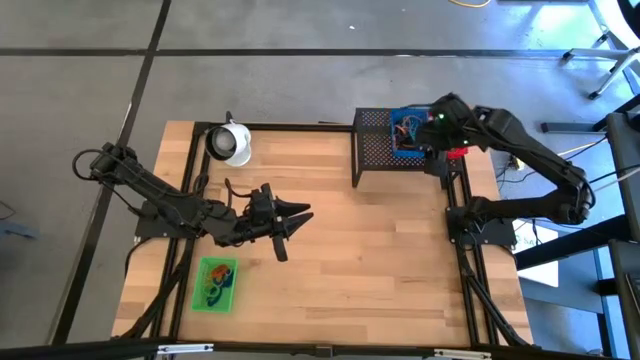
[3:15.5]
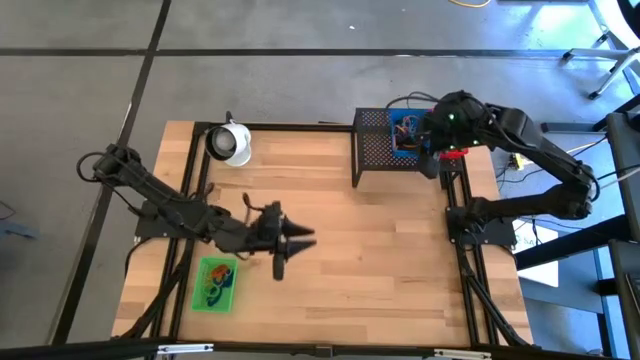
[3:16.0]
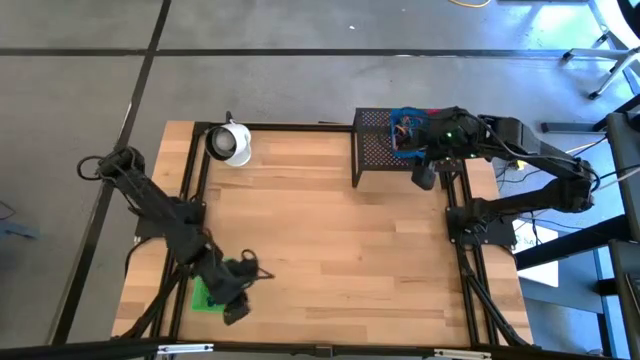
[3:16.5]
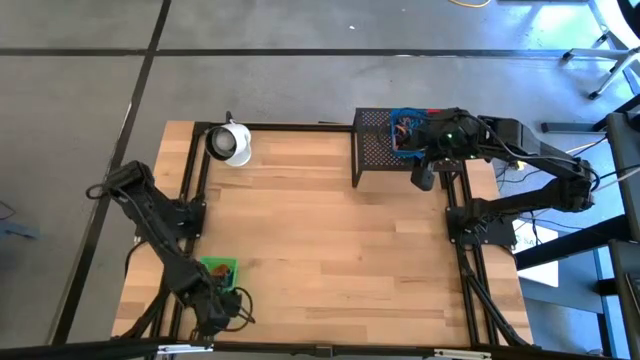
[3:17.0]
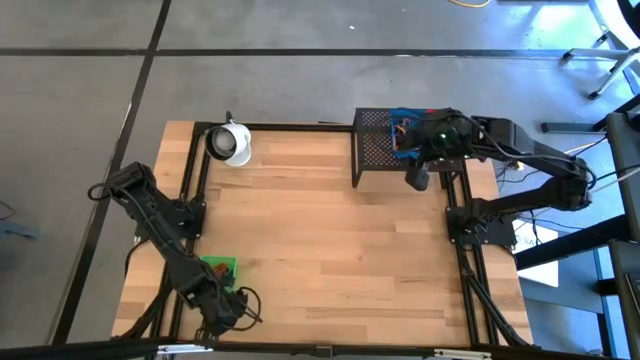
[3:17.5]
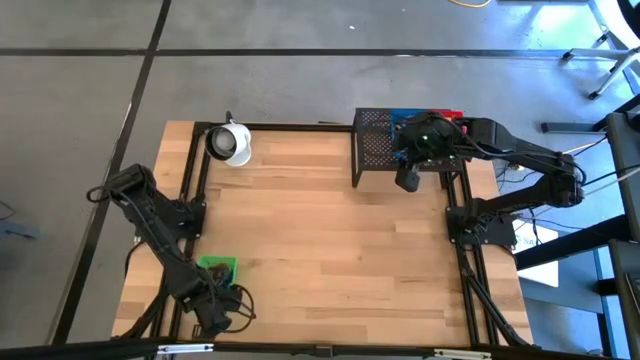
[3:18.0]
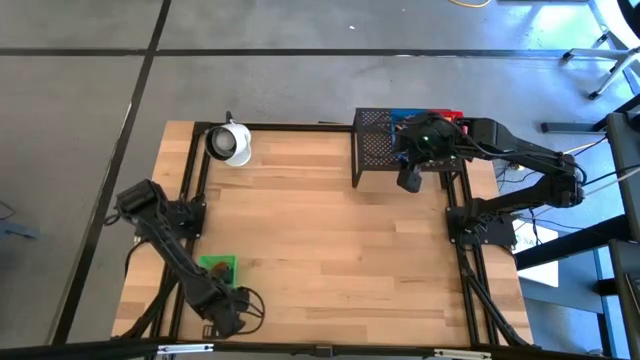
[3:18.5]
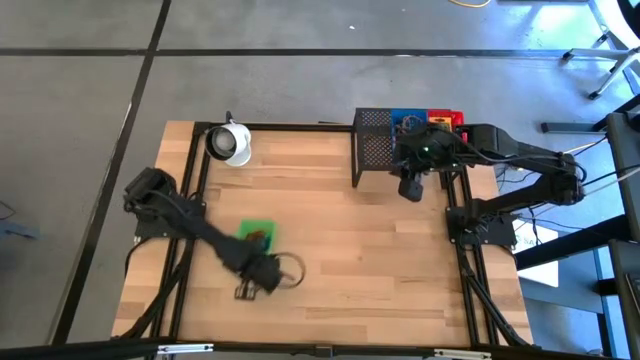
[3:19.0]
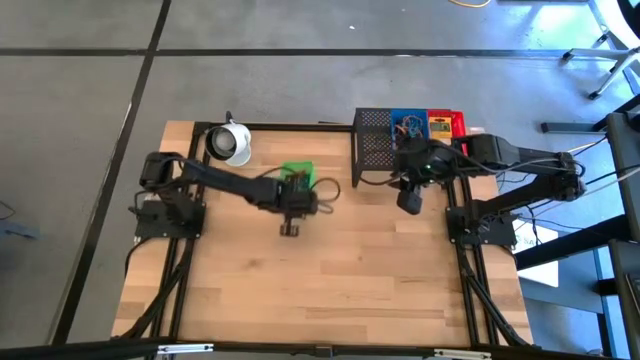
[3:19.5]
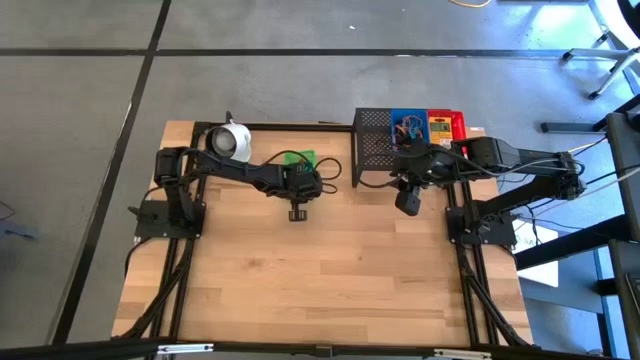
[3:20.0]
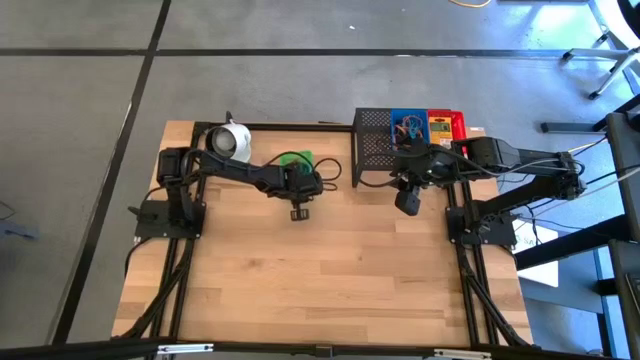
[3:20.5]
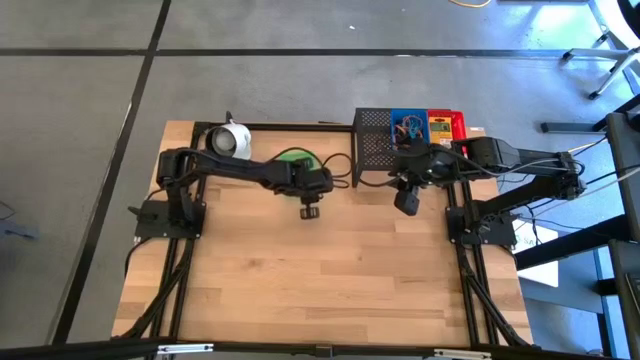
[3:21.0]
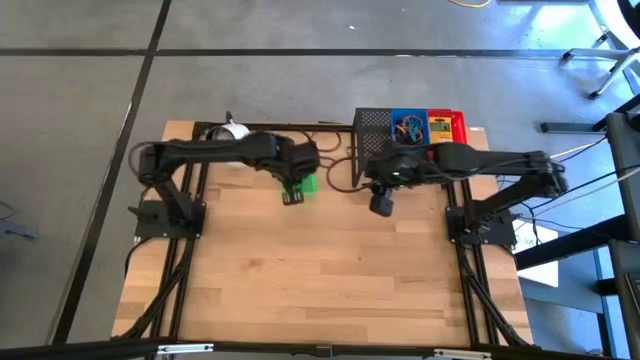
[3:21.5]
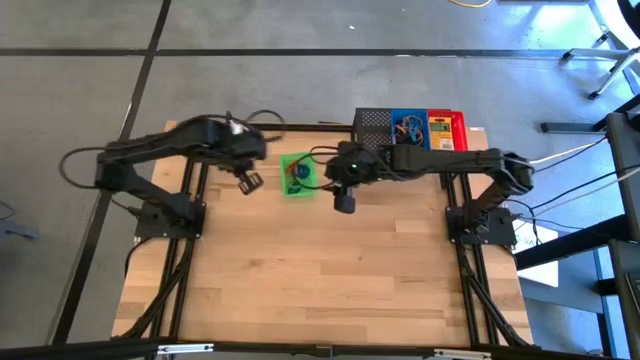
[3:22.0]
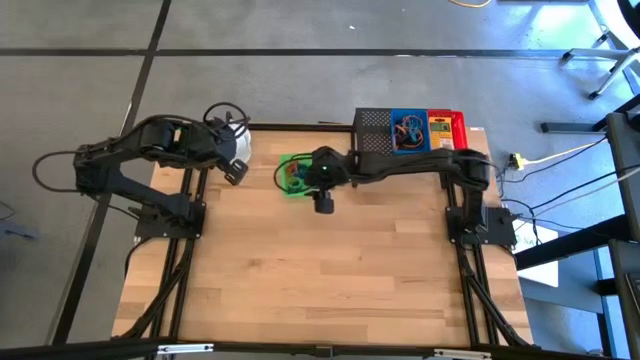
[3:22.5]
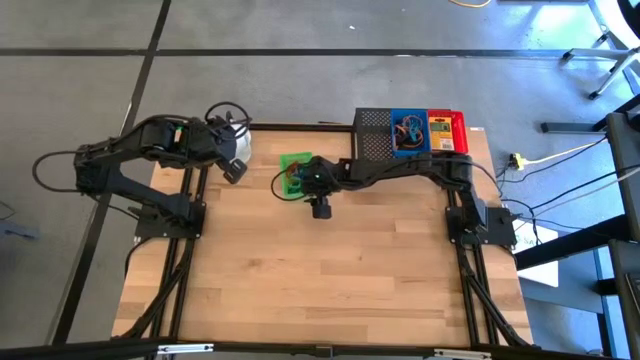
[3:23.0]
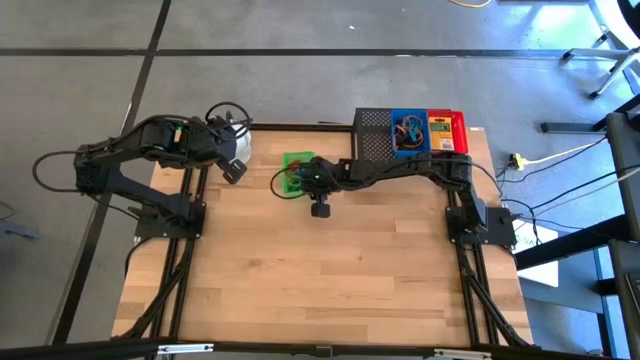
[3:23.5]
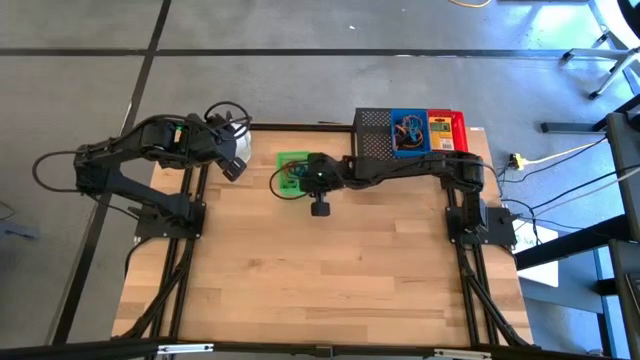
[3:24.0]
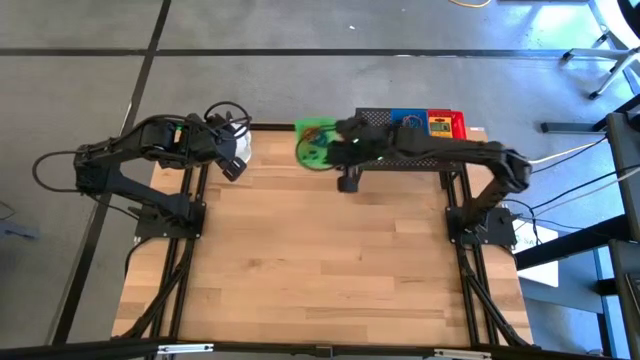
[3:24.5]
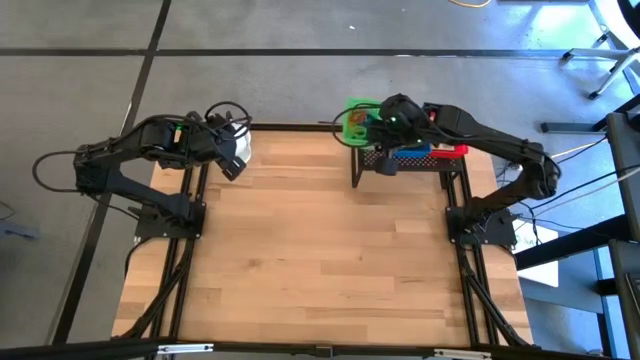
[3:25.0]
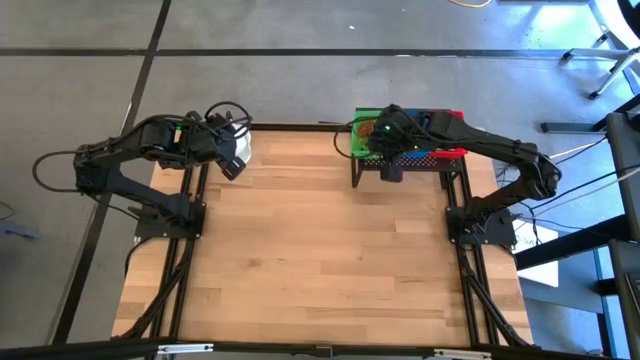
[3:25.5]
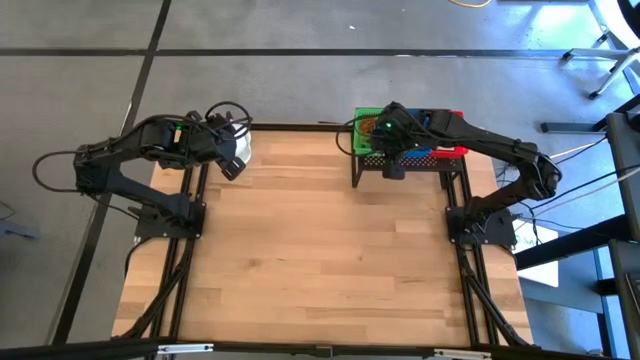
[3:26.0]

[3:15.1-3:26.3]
Task: Pick & Place Office Desk Supplies
Put the green bin with spring keychains on the shelf

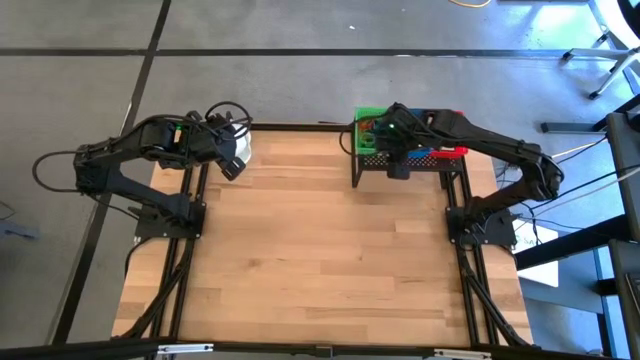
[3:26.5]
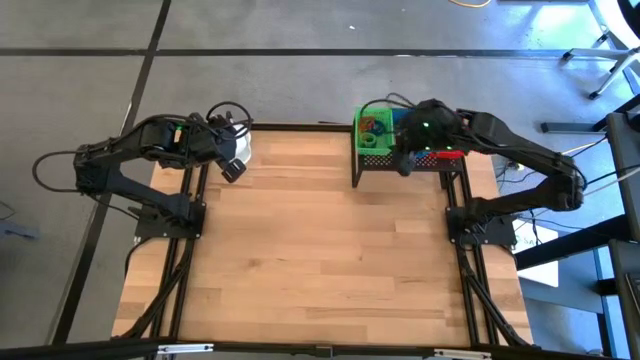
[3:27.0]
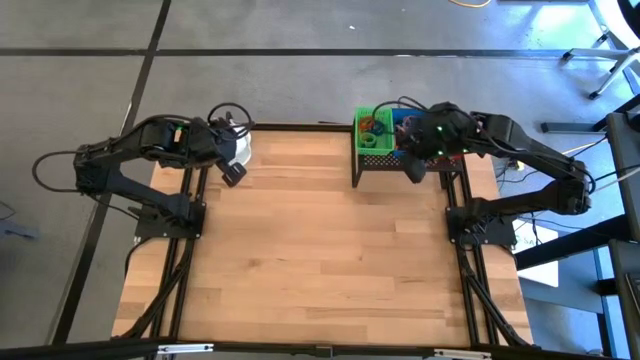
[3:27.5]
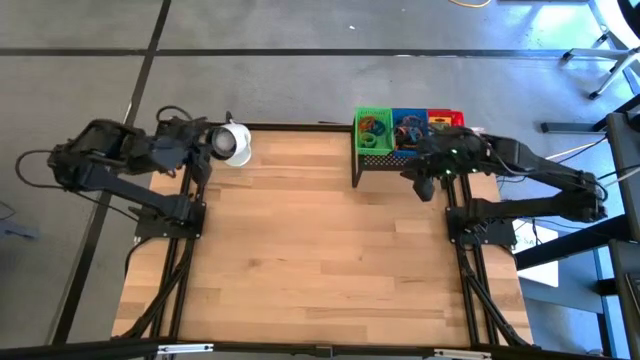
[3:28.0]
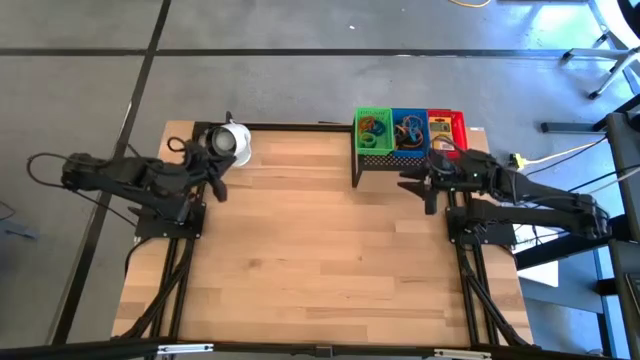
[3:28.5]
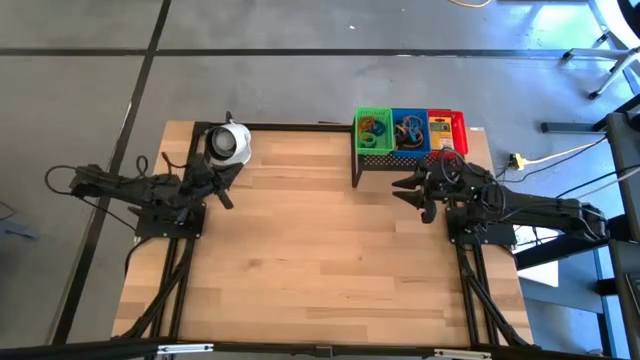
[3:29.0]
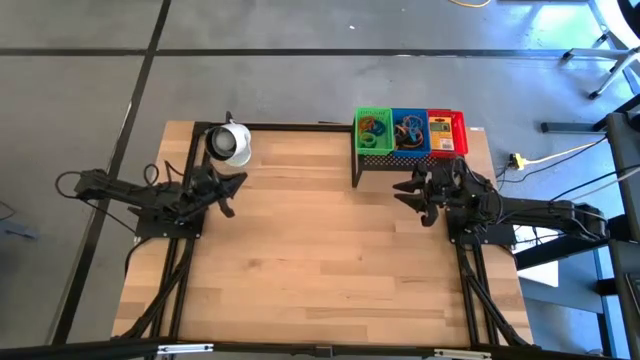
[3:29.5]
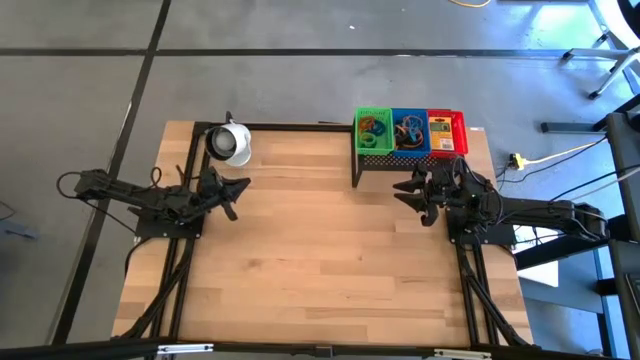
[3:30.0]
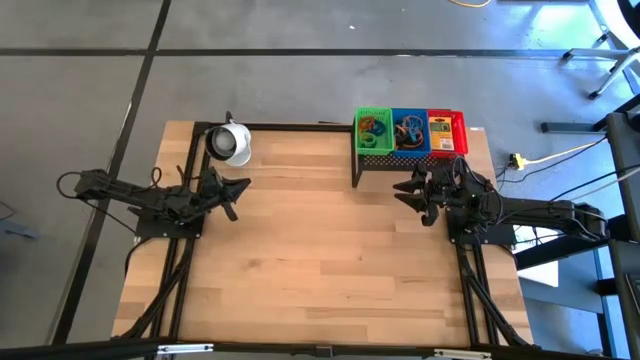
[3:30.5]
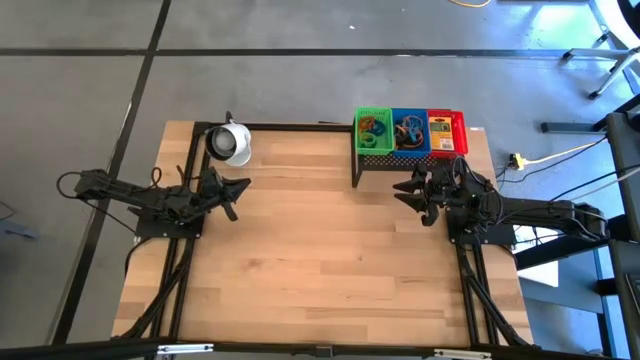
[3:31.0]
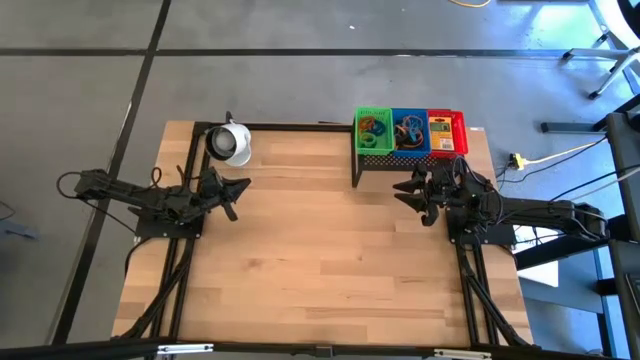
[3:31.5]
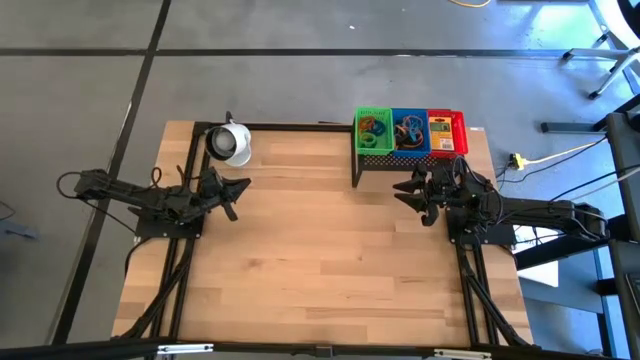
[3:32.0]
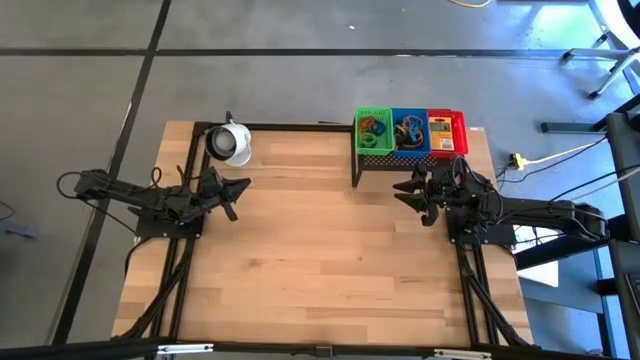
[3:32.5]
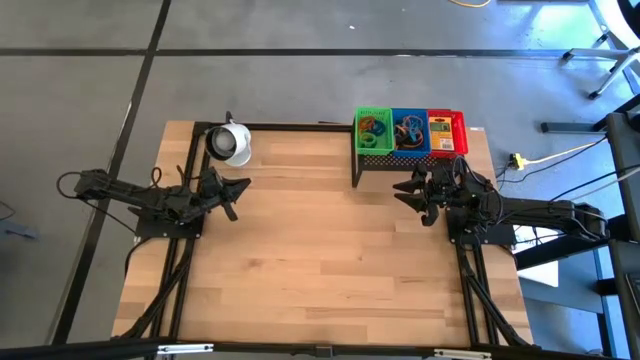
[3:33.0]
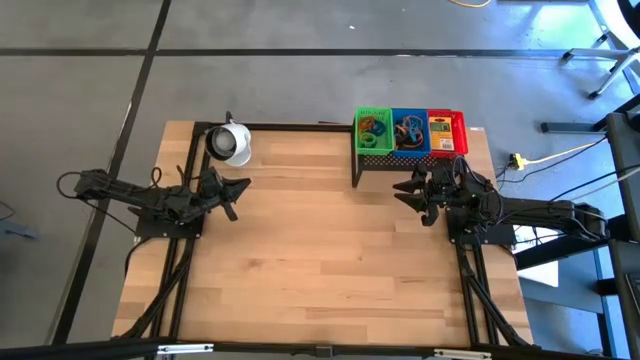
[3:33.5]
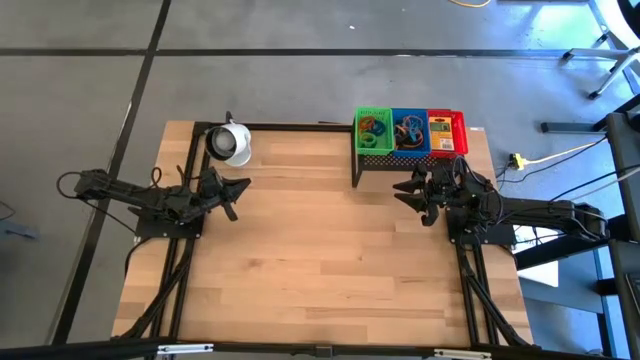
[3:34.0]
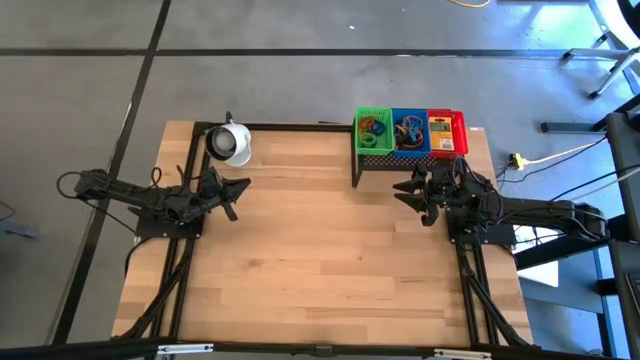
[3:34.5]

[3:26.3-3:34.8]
Return to Home Position
